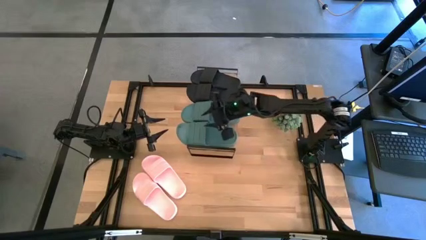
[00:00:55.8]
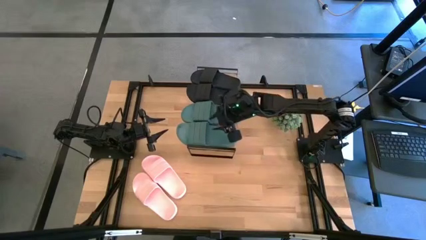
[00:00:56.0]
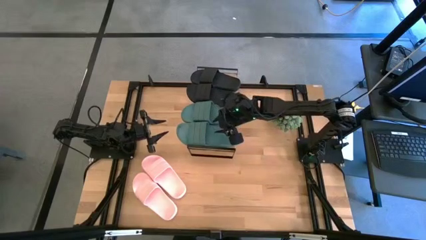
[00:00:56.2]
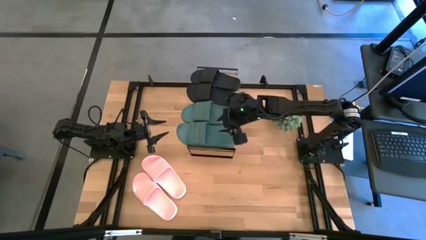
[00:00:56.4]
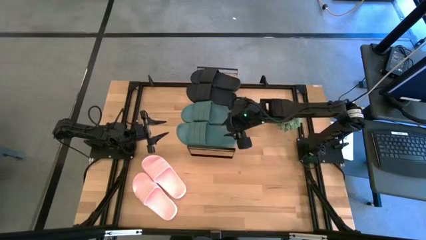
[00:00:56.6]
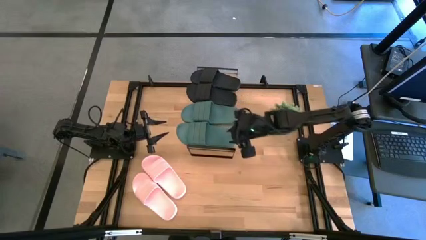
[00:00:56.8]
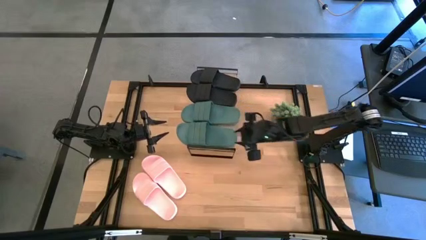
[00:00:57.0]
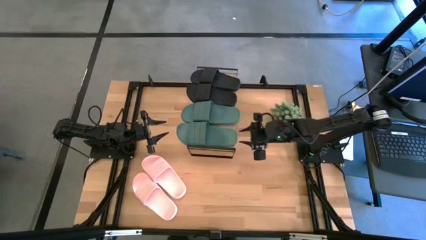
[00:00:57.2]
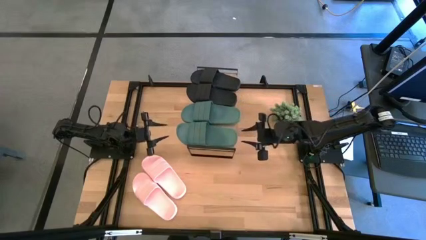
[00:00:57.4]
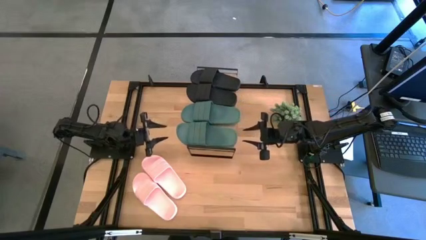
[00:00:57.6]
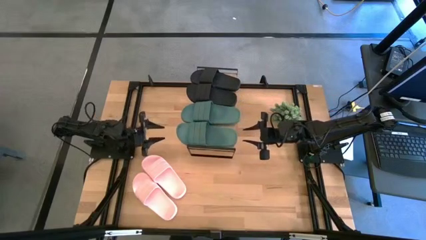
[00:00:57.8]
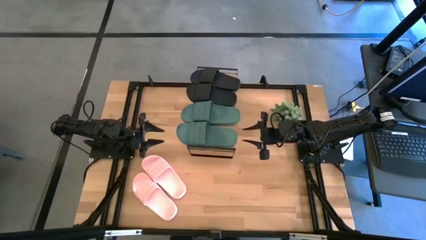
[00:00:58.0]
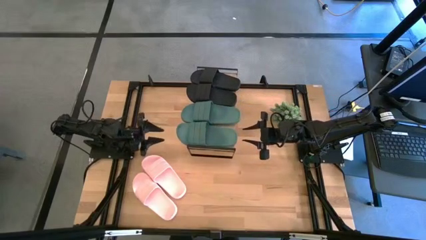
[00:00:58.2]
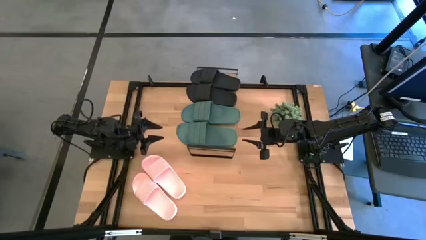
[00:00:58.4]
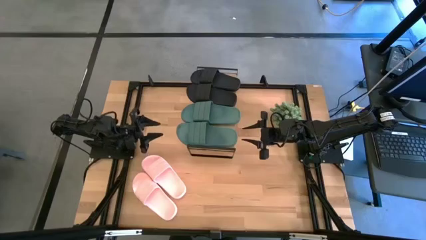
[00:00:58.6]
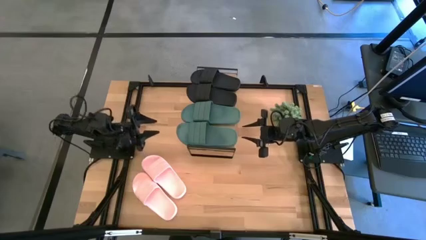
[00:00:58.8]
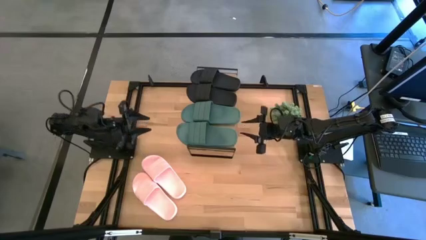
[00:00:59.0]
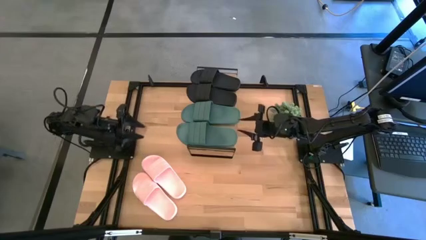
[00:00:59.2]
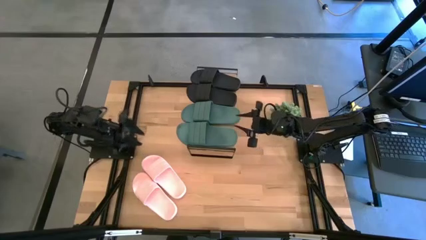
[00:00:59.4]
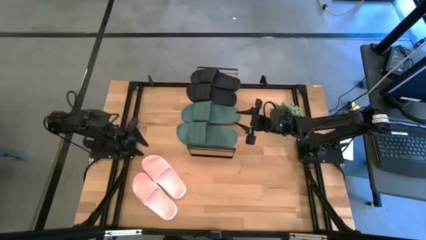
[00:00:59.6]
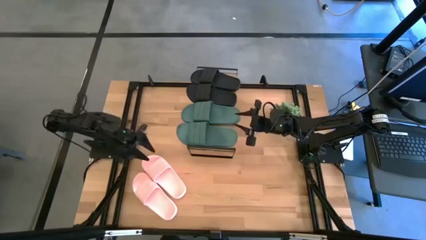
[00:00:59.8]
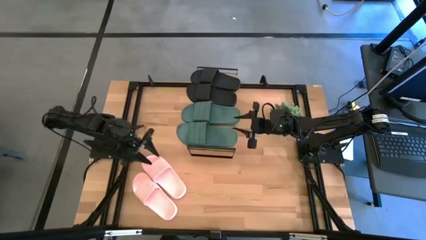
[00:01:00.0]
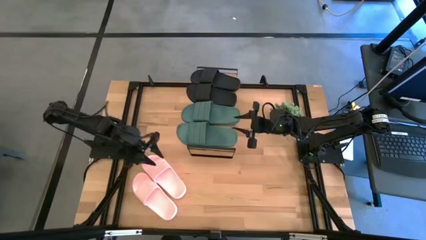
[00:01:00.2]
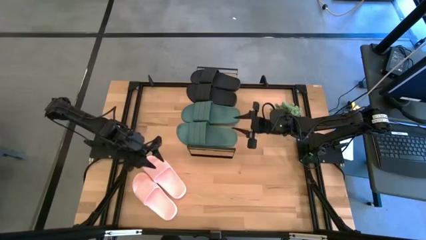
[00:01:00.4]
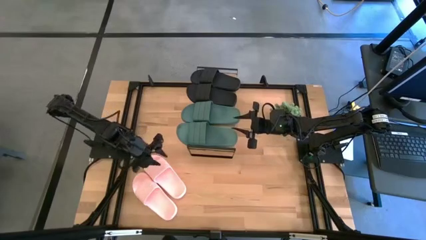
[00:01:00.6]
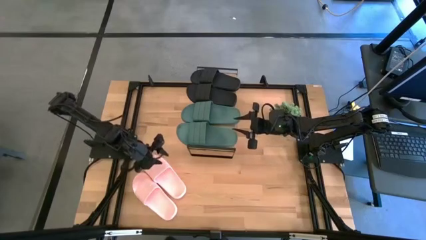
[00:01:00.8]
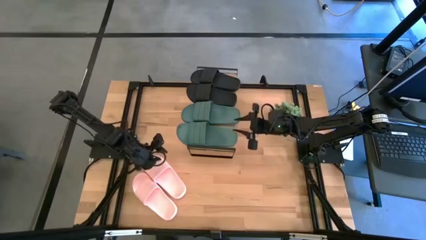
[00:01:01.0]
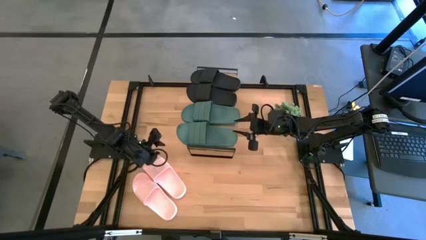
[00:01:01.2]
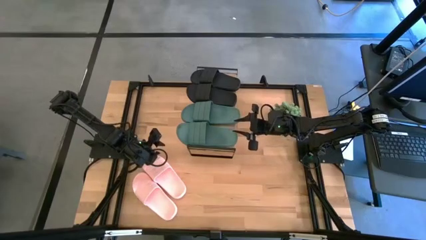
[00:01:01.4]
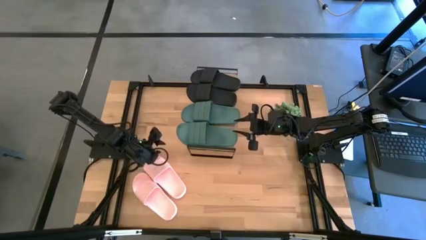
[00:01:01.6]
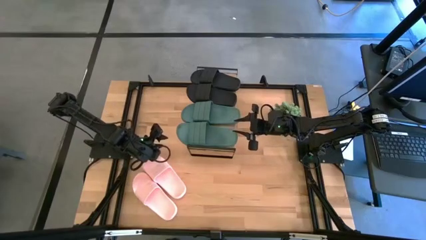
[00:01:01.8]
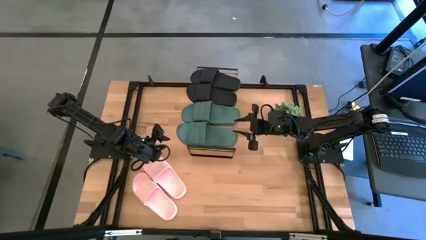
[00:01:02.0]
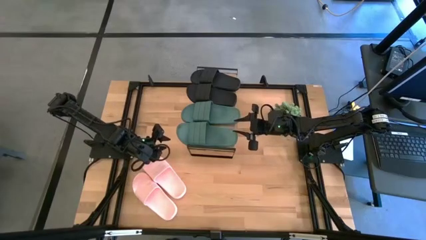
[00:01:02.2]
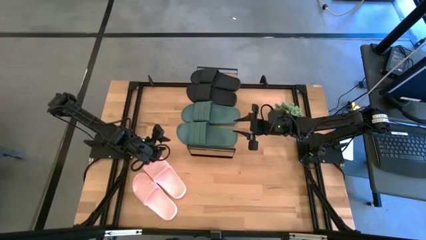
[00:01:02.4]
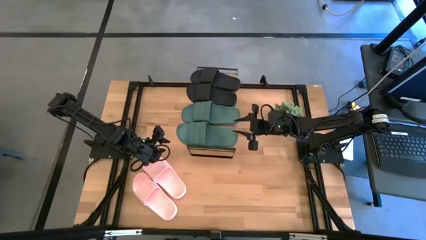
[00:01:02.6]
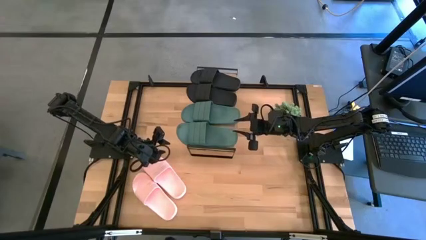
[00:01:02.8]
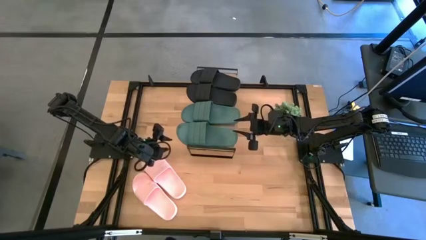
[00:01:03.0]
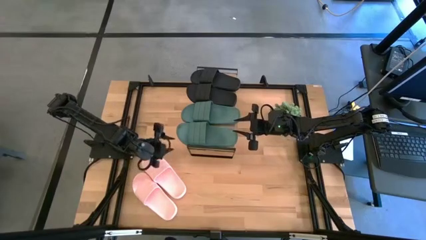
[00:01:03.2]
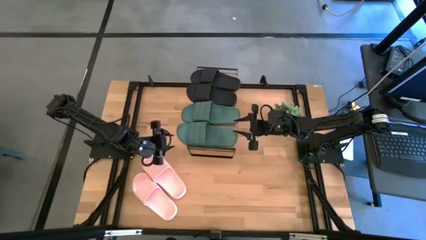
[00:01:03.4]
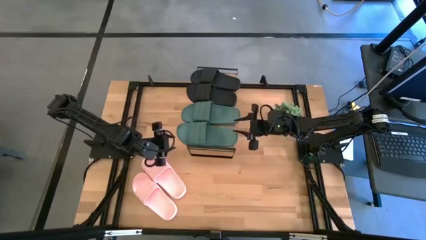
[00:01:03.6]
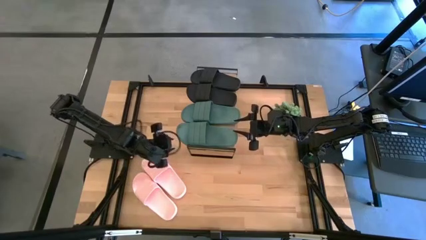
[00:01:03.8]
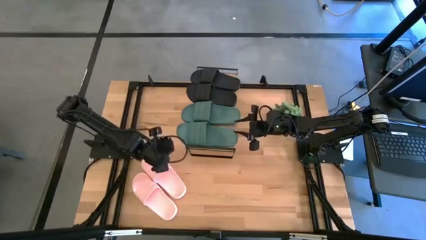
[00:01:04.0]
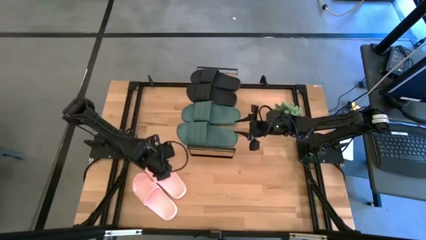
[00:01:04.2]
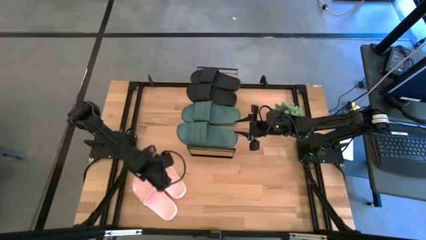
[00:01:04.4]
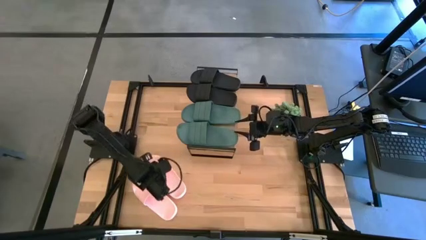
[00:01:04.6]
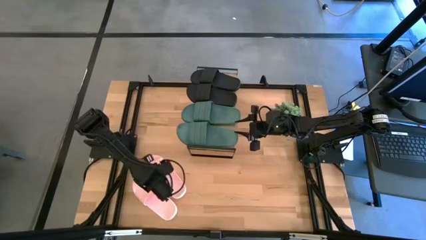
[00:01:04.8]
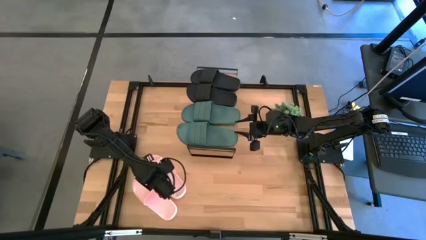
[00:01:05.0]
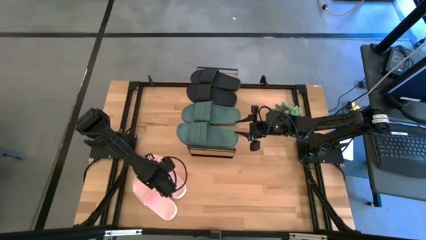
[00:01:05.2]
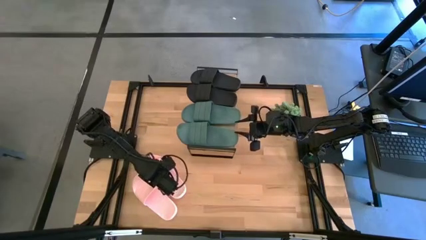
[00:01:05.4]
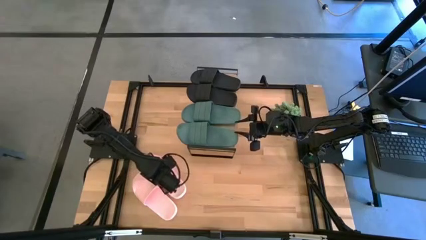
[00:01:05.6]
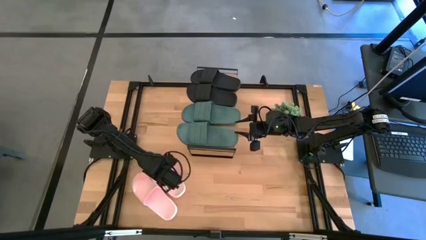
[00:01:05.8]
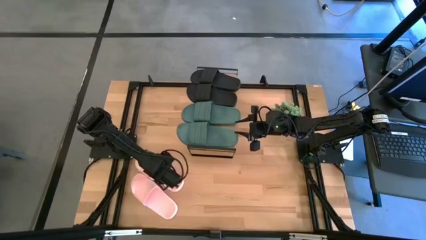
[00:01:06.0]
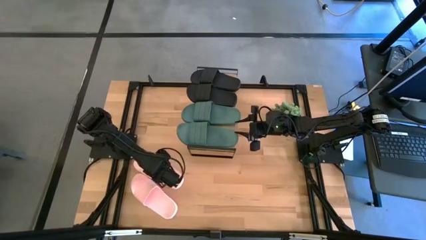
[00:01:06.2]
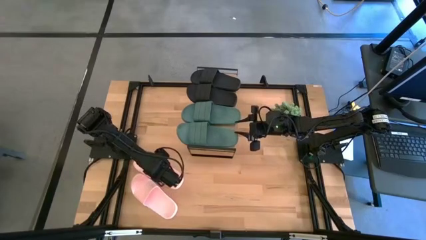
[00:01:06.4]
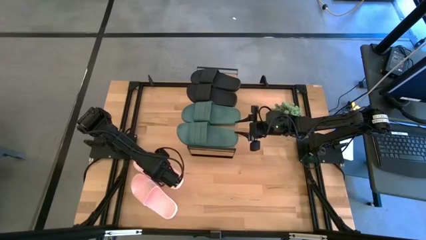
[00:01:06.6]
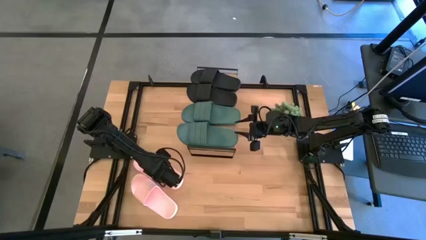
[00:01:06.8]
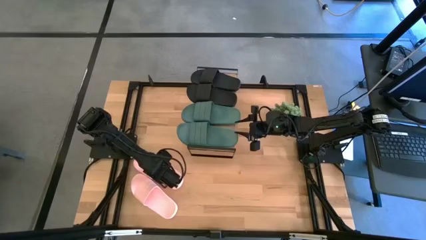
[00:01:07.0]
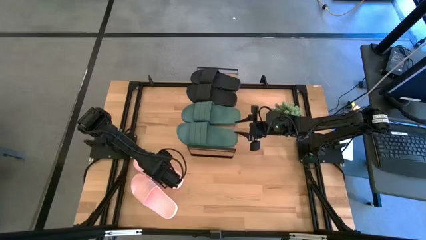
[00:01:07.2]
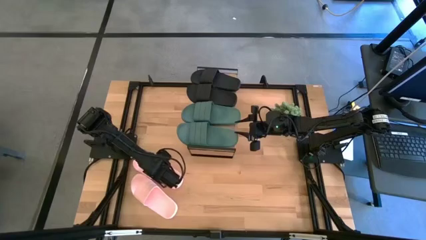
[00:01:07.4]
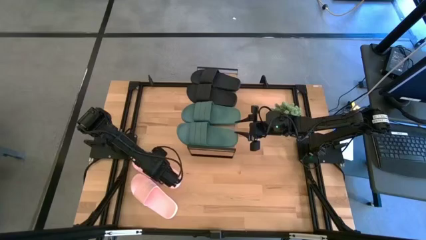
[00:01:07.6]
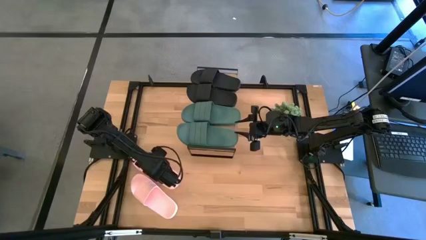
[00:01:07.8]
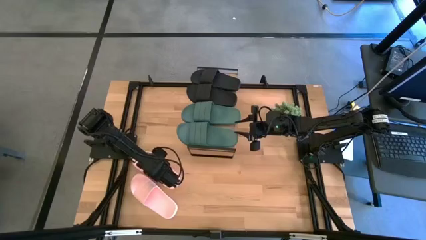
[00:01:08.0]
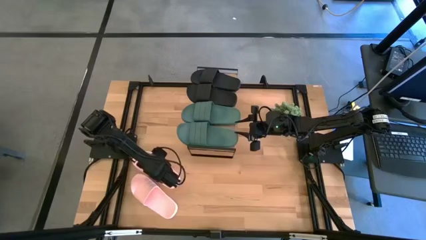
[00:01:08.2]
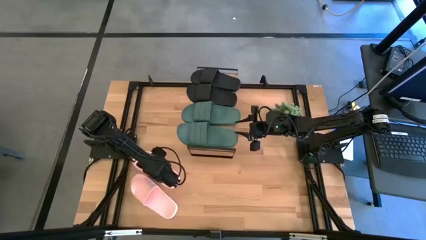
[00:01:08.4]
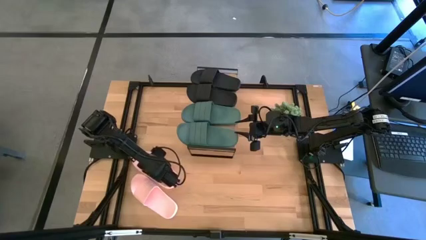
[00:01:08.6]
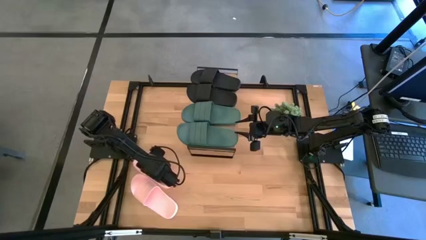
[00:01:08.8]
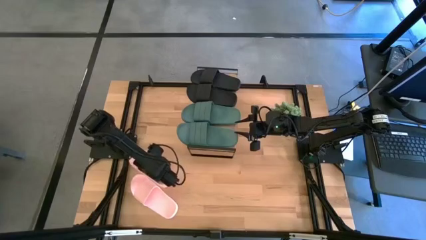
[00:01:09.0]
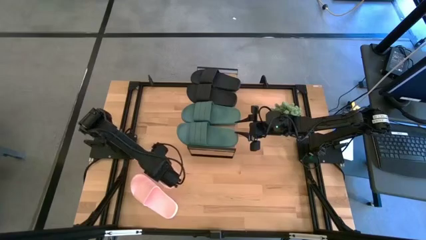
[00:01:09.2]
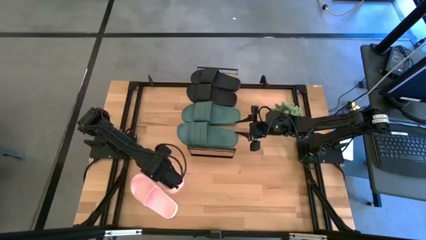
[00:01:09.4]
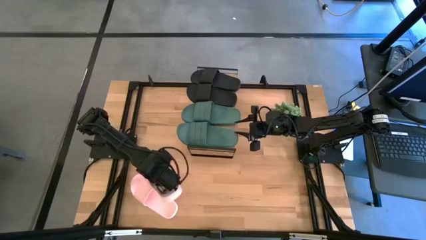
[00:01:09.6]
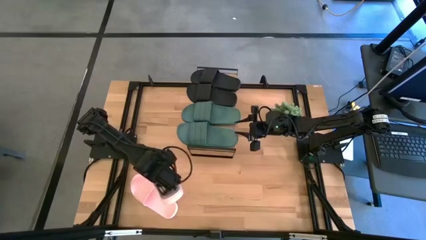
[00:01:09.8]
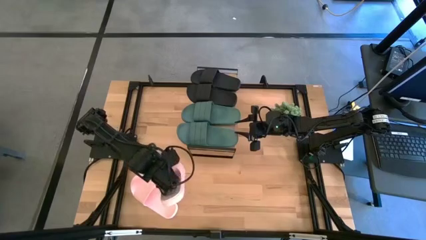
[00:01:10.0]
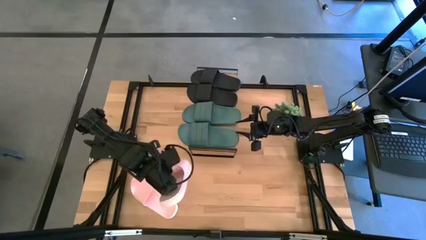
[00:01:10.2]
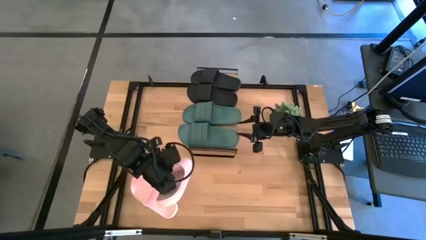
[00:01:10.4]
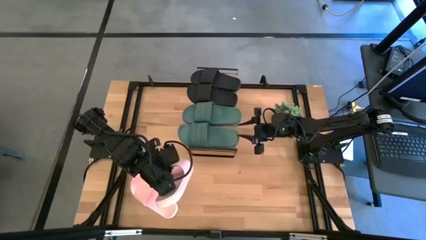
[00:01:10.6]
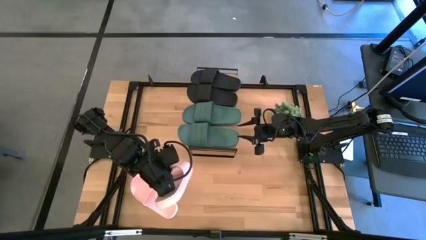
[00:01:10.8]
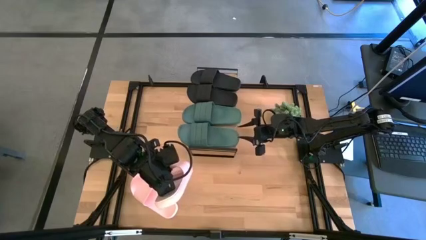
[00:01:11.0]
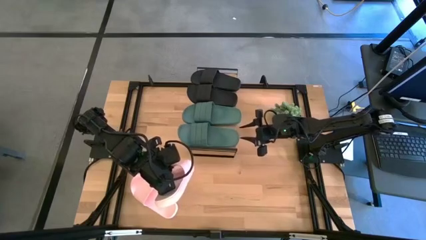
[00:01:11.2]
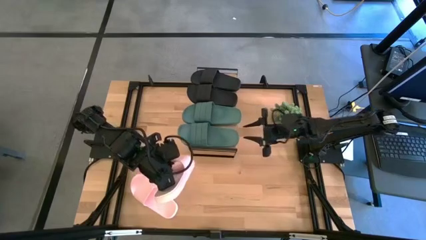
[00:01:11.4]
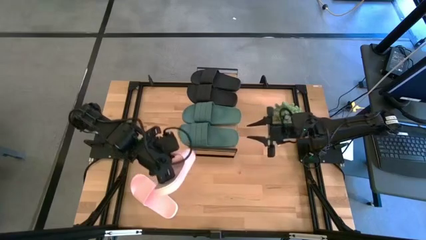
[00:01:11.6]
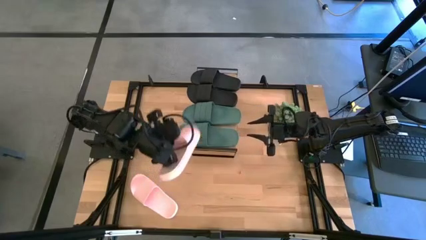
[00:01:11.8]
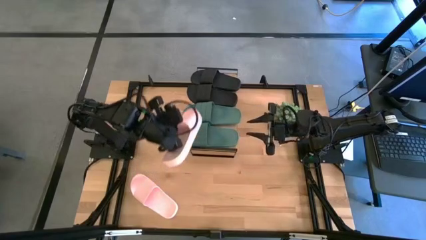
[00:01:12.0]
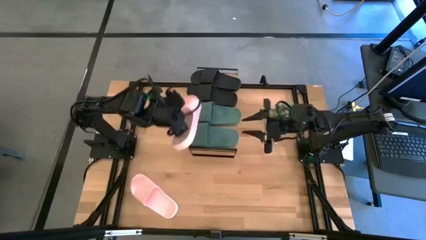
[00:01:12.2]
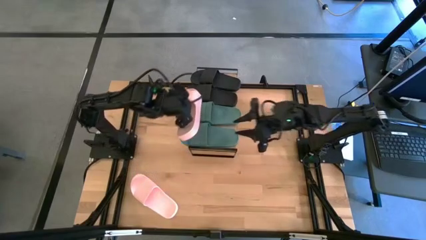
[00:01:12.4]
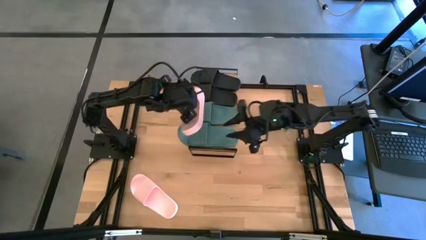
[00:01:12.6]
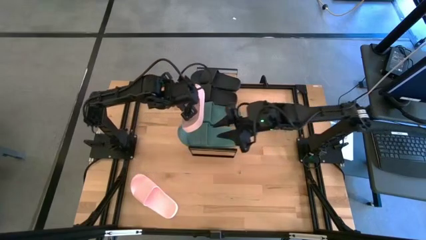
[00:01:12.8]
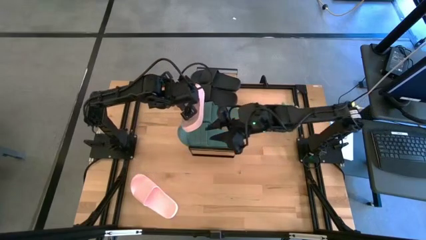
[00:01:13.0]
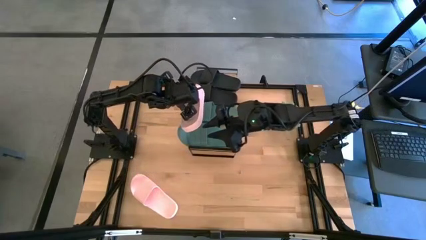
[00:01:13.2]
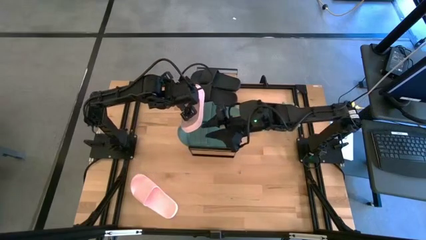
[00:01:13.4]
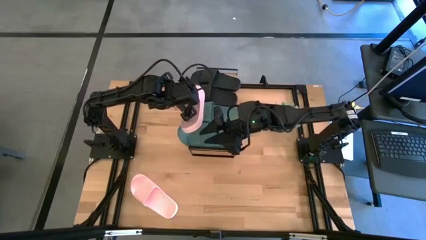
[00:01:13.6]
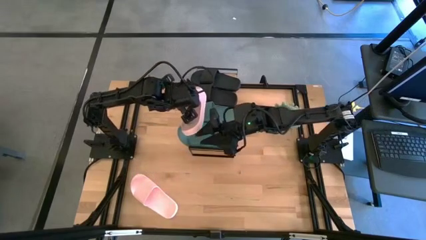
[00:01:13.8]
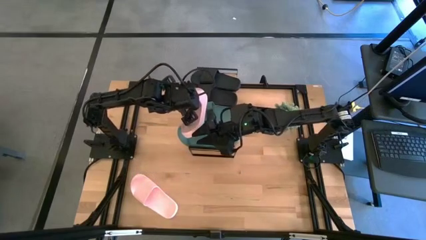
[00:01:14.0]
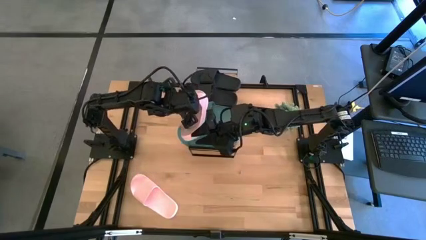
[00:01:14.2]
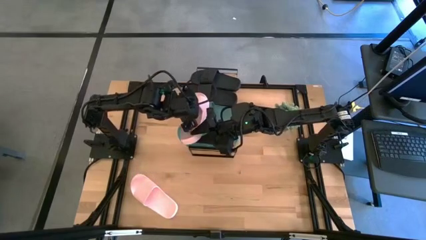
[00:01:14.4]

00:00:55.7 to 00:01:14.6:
Task: Pick and place slides into the shelf
Put the top pink slipper under the shelf
